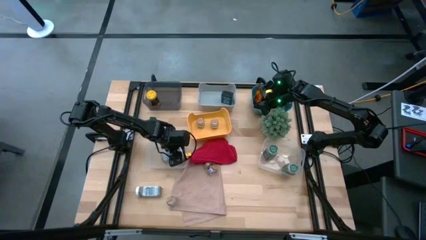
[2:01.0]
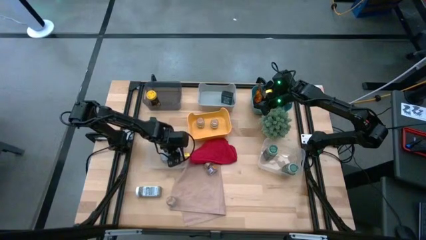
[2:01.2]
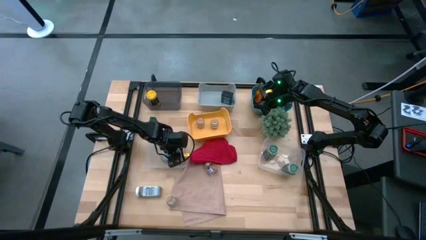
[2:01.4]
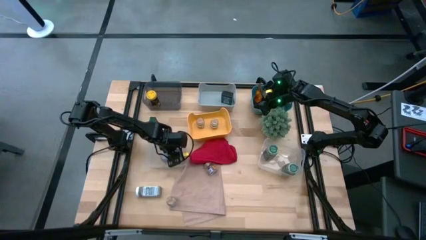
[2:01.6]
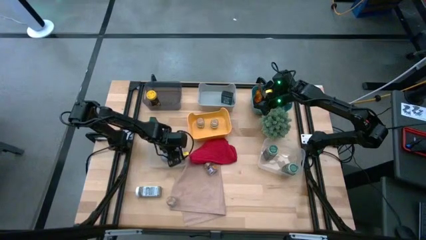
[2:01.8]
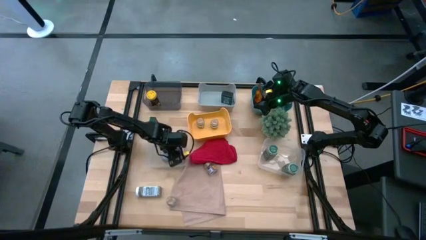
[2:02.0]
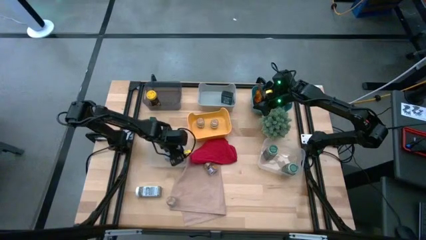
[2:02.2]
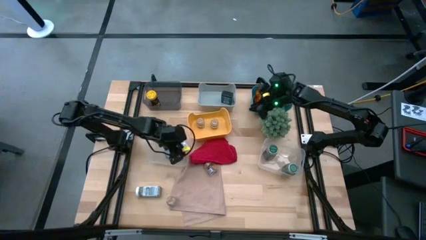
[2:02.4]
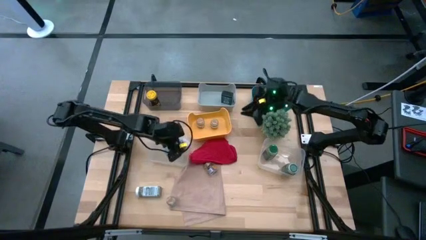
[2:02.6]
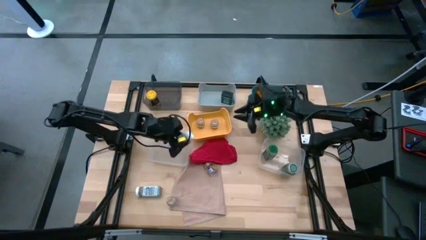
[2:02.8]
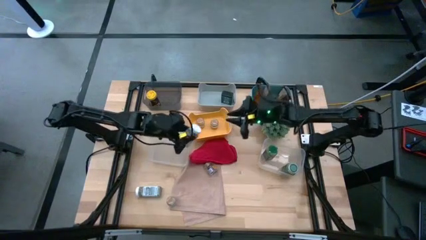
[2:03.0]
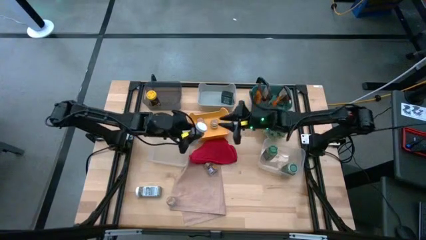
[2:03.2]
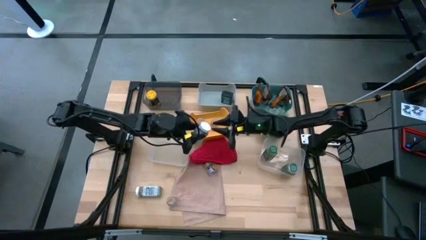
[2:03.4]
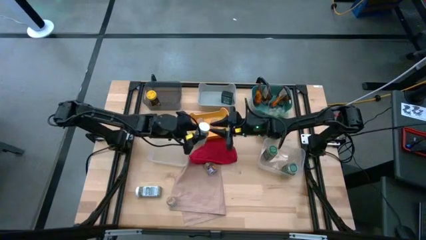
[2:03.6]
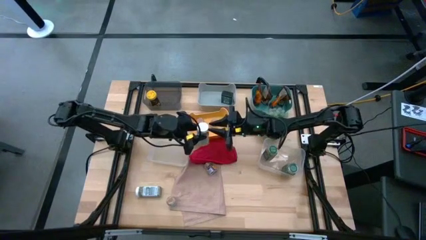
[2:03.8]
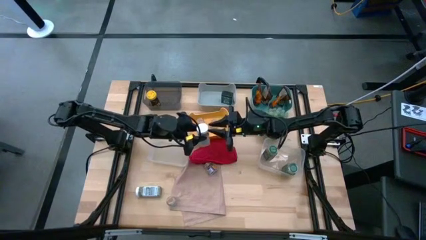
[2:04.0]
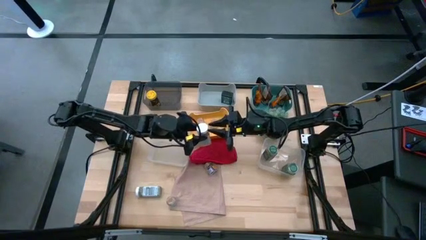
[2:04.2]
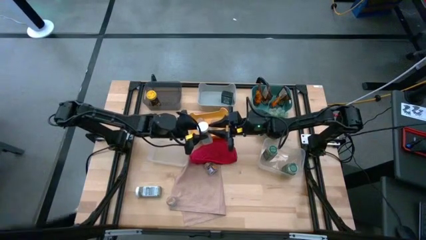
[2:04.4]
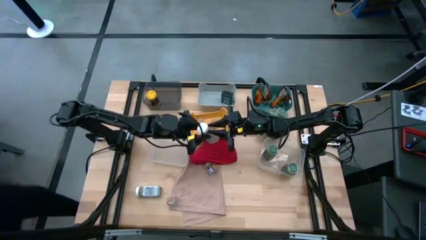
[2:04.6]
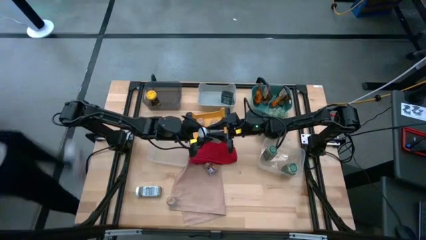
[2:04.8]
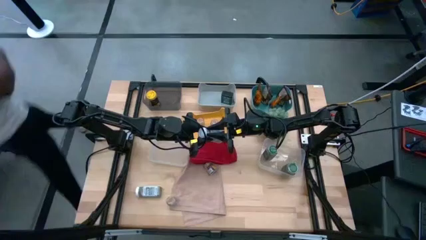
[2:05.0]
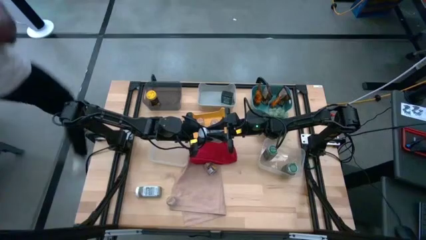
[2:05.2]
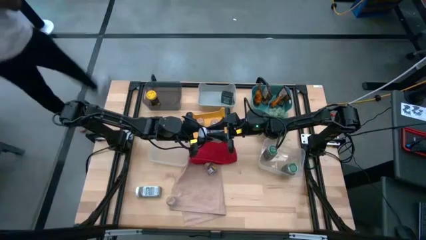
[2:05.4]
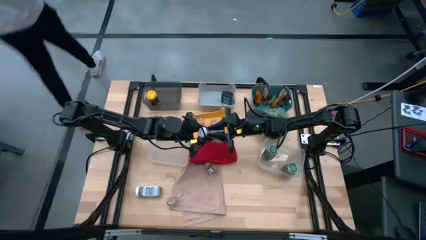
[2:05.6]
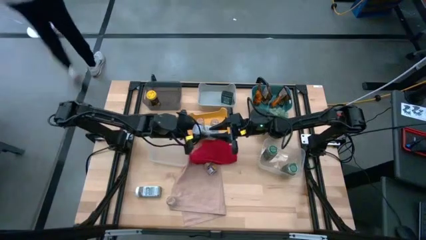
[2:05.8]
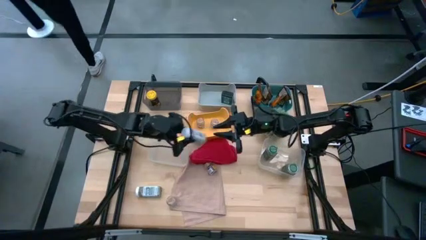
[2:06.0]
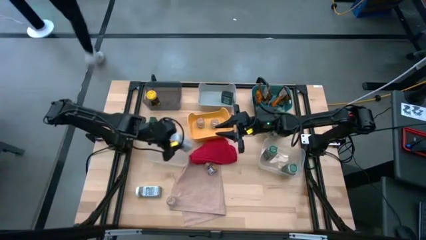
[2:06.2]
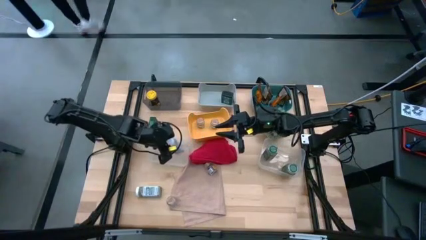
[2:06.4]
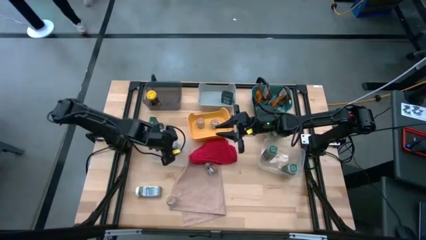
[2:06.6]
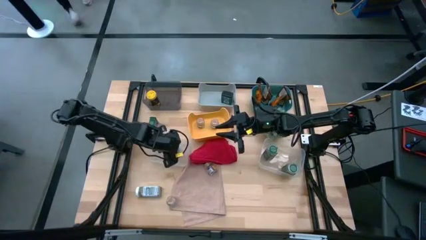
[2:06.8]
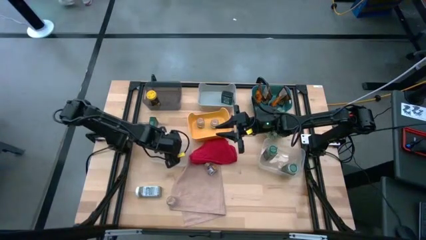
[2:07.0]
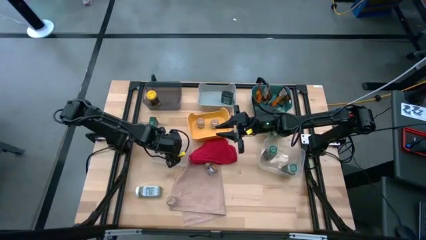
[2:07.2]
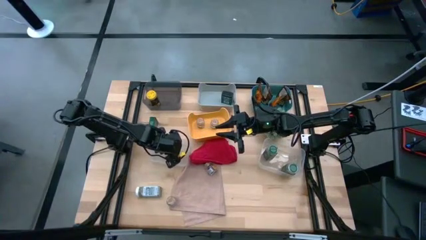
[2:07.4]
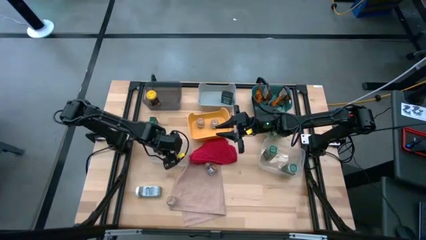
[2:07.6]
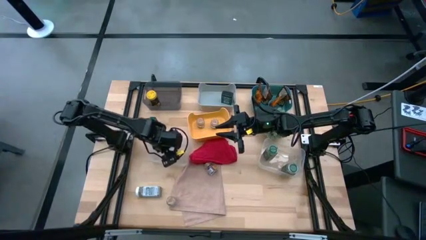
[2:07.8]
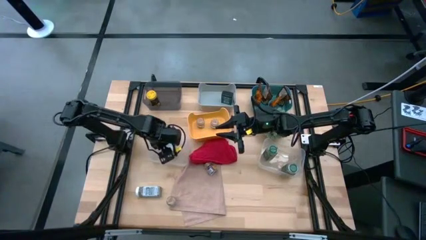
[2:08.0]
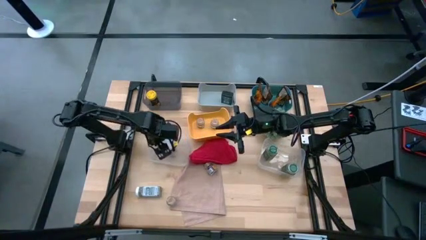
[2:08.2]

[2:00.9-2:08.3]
Task: Sort spices by type
Put the white seasoning bottle into the left transparent bin

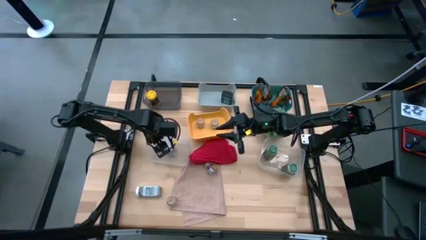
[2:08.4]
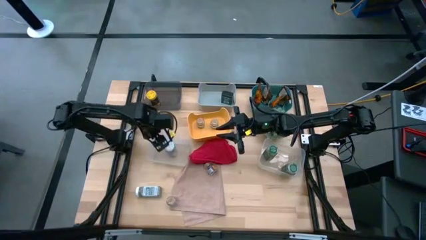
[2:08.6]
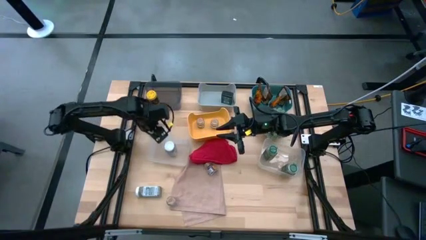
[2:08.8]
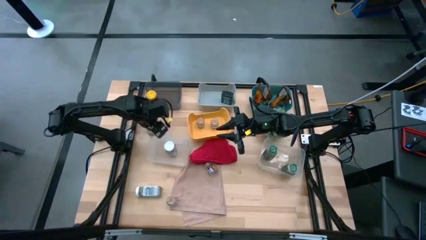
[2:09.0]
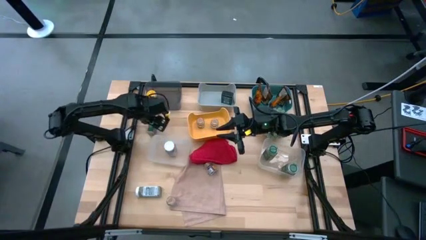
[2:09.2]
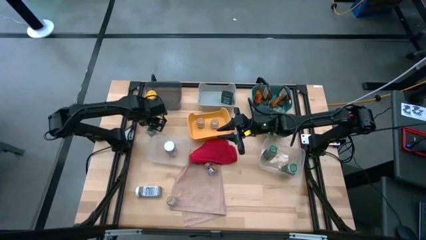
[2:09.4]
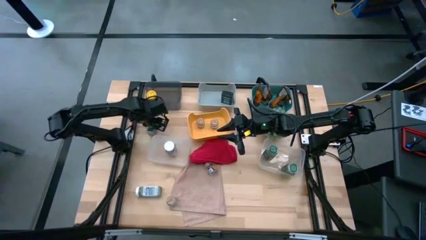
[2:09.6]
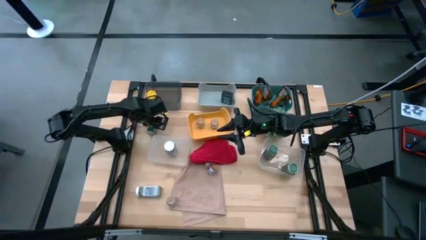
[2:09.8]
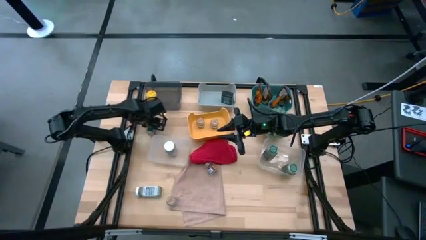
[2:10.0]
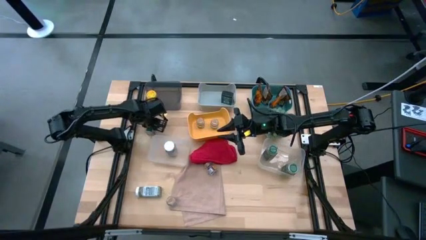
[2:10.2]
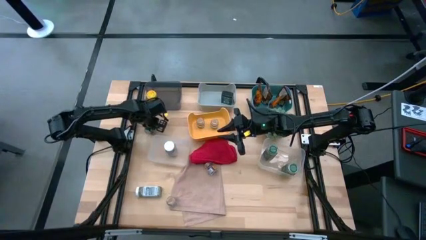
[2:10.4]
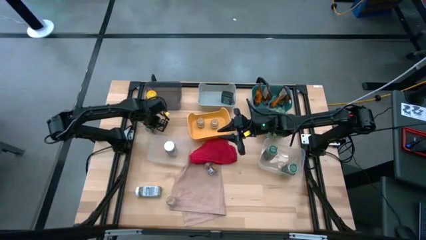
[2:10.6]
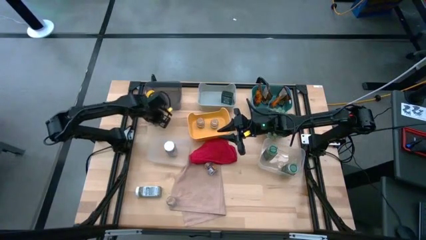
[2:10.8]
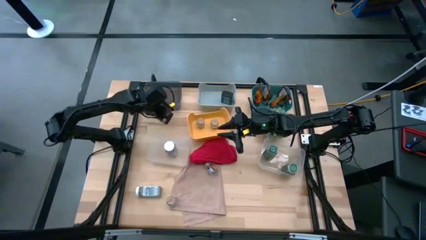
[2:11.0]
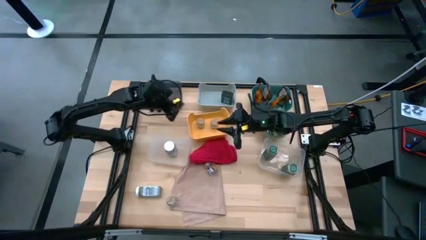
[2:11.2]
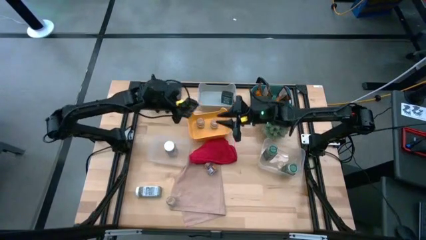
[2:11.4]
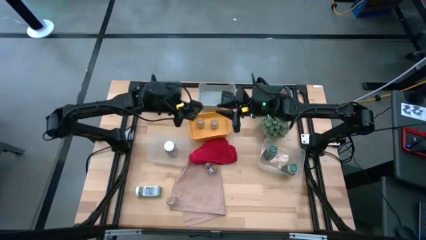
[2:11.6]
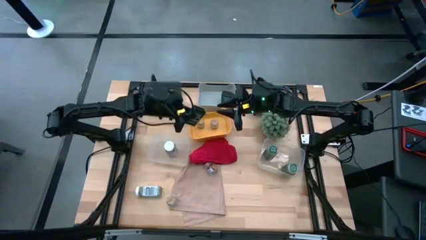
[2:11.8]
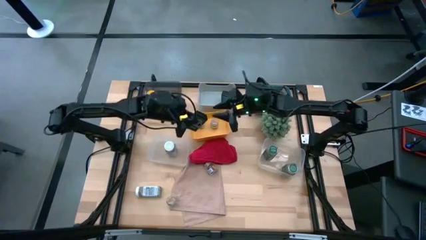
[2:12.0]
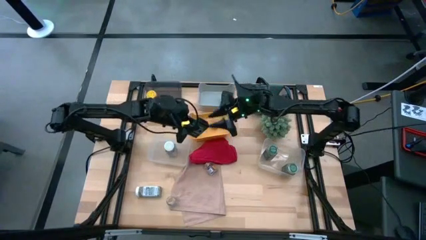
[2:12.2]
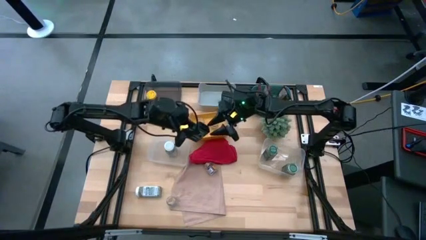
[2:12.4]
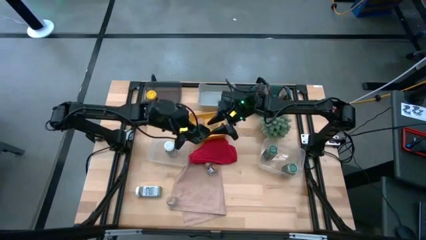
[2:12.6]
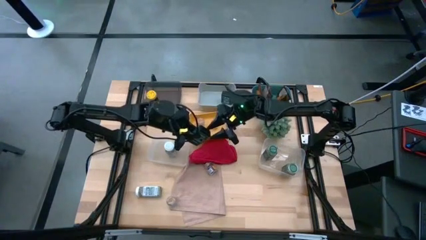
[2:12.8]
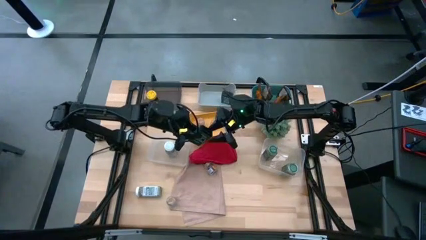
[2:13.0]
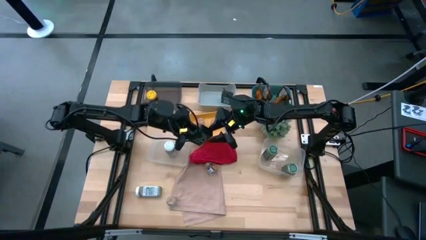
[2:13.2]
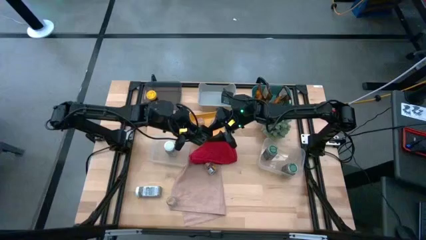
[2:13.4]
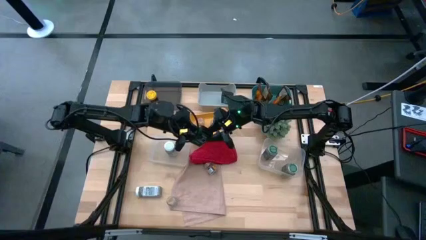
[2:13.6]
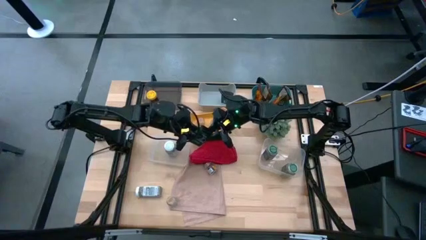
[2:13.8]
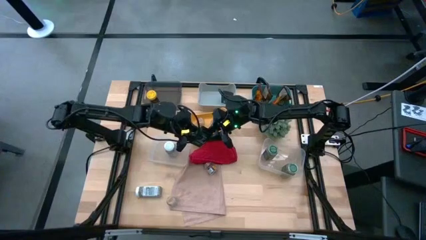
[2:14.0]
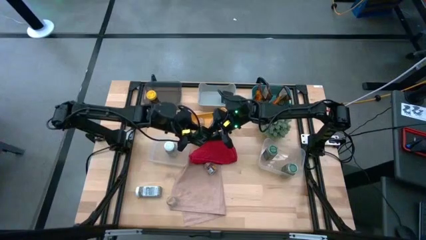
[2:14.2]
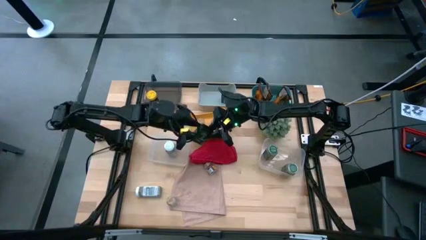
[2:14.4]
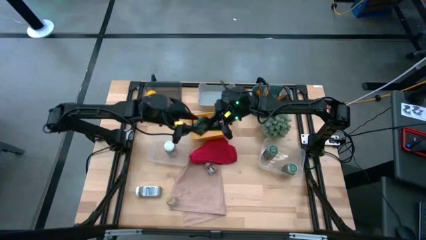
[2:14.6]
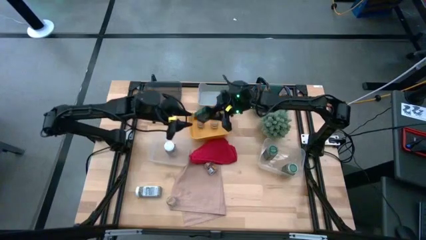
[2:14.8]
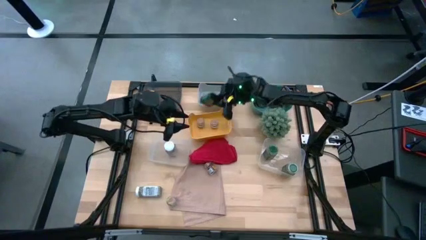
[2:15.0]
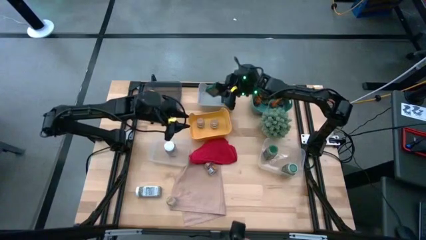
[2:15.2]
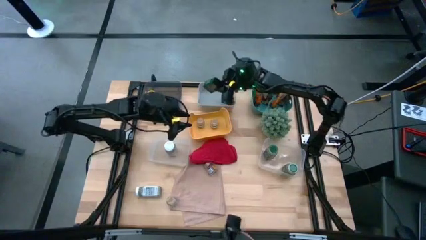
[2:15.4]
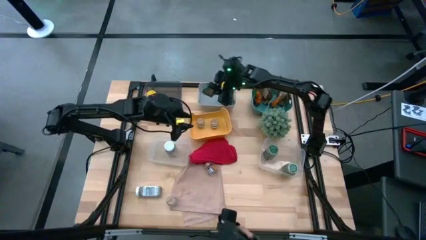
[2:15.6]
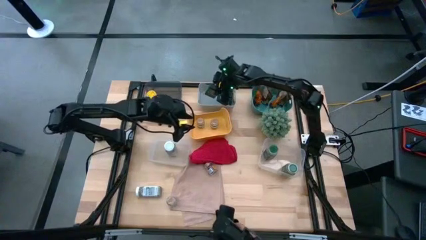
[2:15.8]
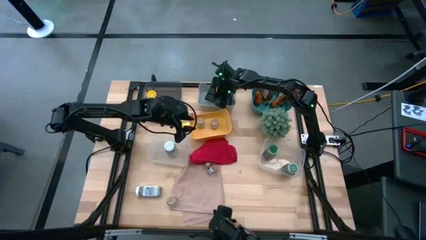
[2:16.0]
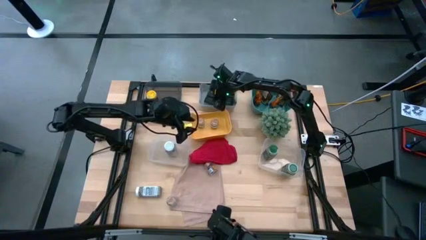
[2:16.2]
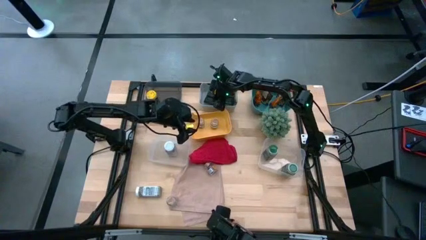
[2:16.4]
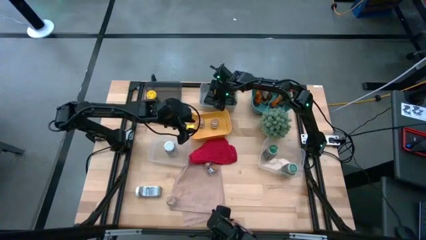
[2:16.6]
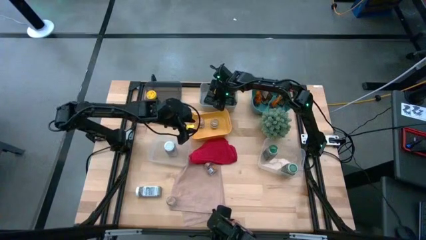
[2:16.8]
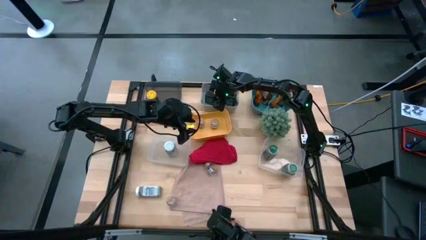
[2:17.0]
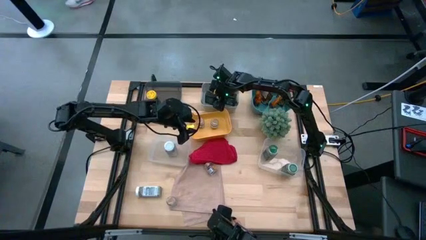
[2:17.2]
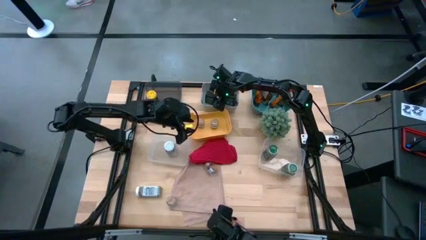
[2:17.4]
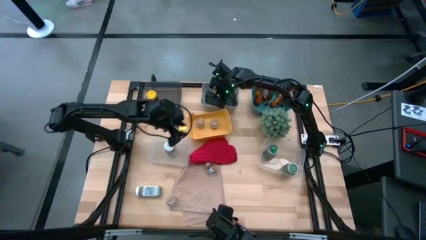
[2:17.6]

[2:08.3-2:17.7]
Put the black seasoning can into the gray bin
